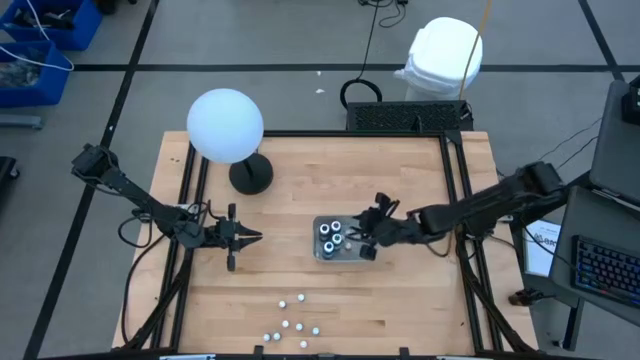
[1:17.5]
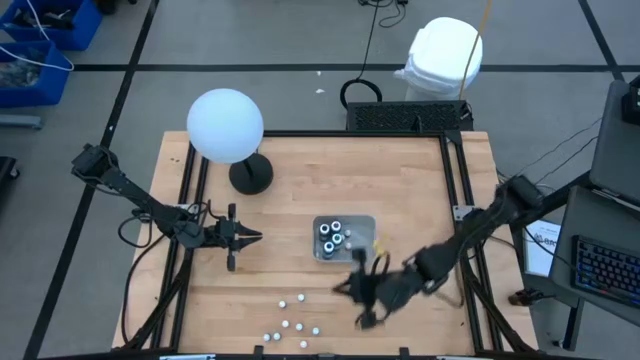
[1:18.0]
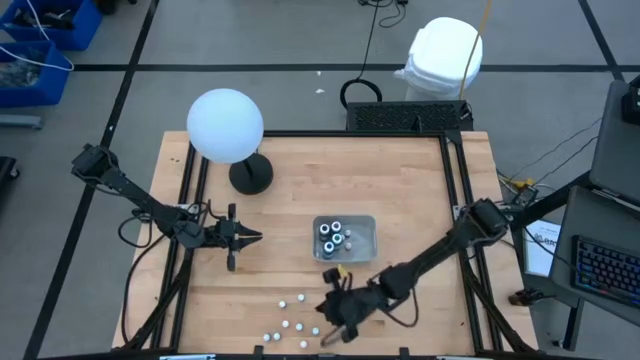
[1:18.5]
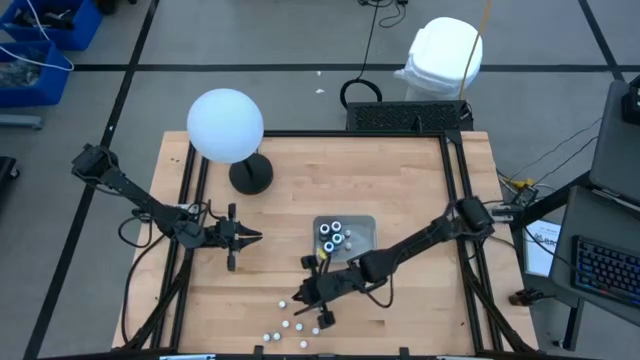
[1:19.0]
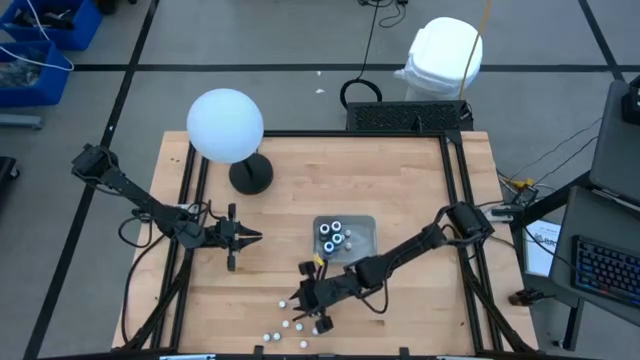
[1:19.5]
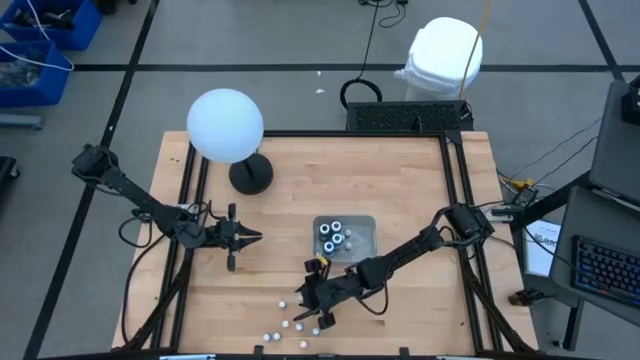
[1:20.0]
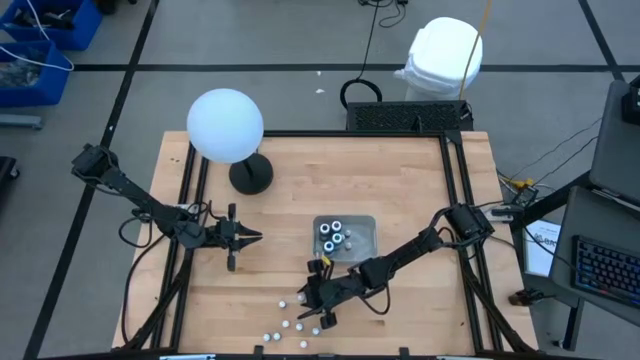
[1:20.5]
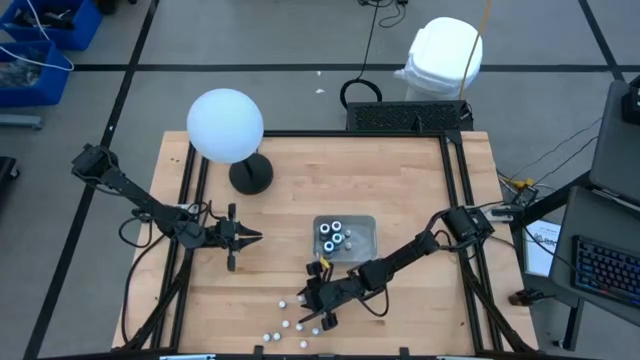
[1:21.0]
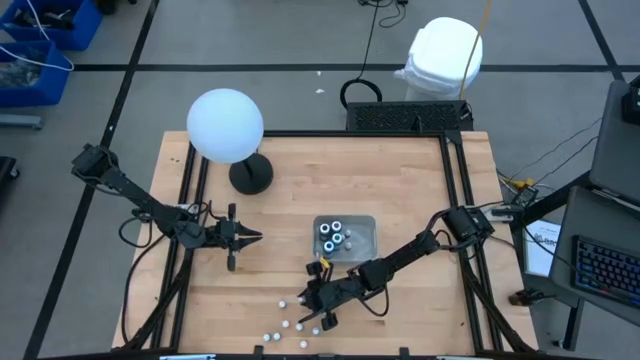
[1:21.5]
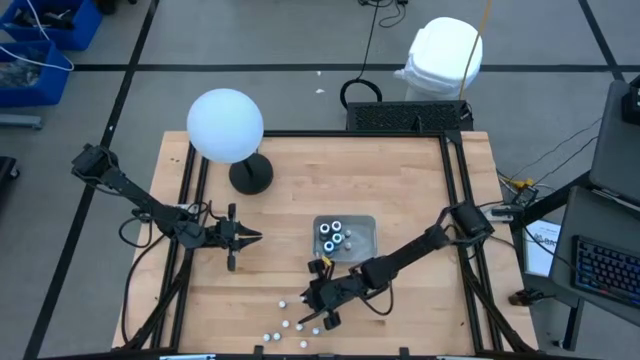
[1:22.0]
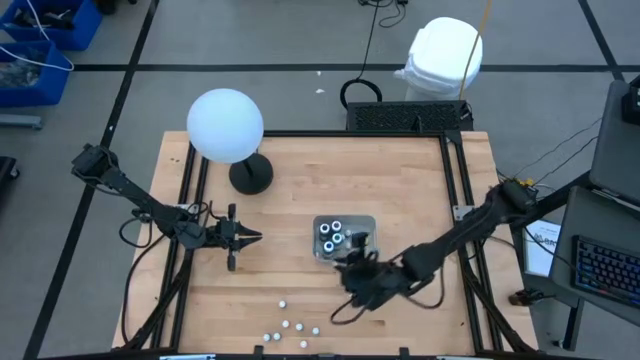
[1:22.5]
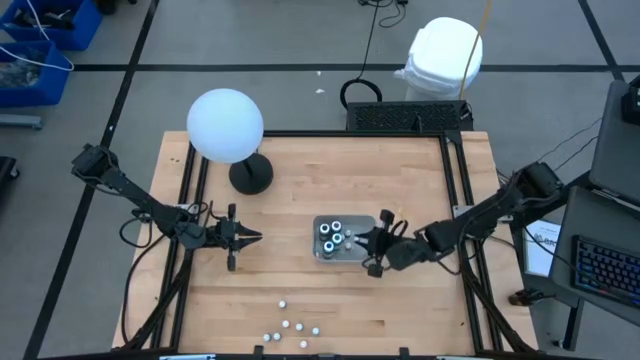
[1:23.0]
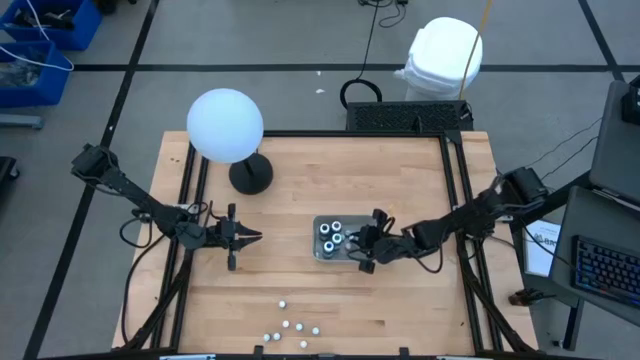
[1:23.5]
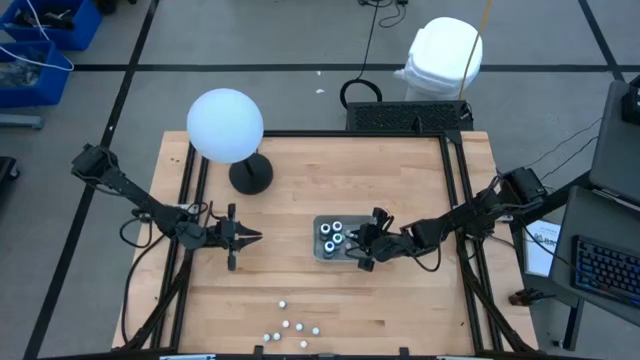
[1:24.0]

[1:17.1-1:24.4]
Task: Pick & Place food coloring
Put the small dark purple food coloring bottle into the gray bin

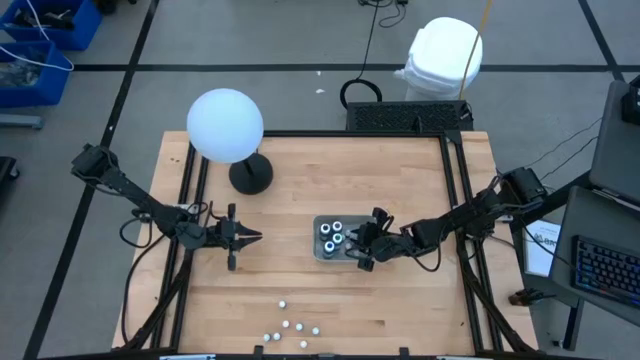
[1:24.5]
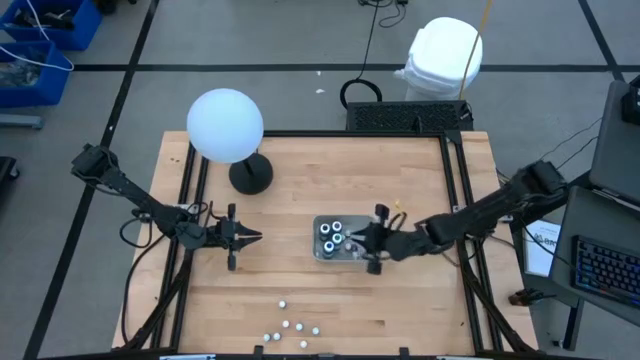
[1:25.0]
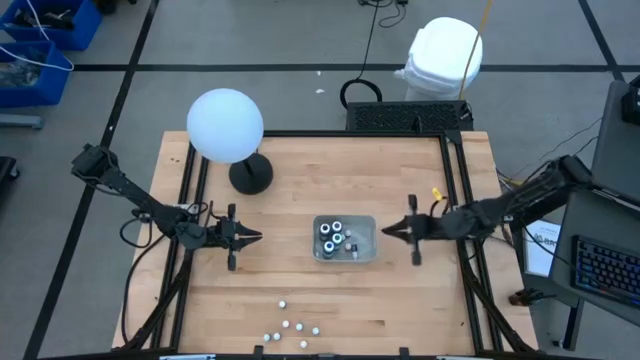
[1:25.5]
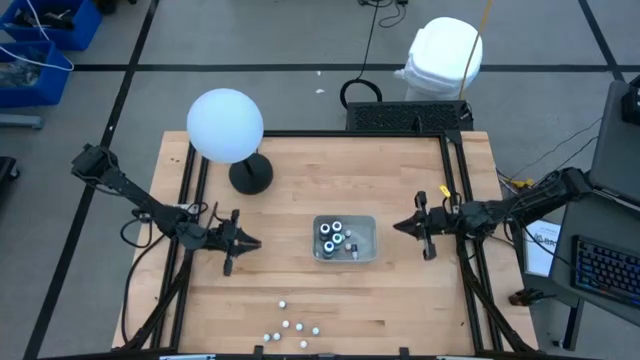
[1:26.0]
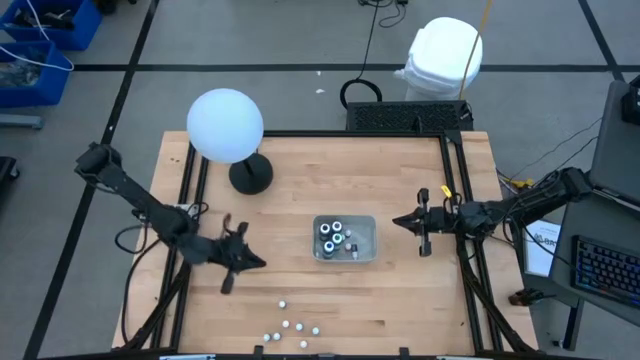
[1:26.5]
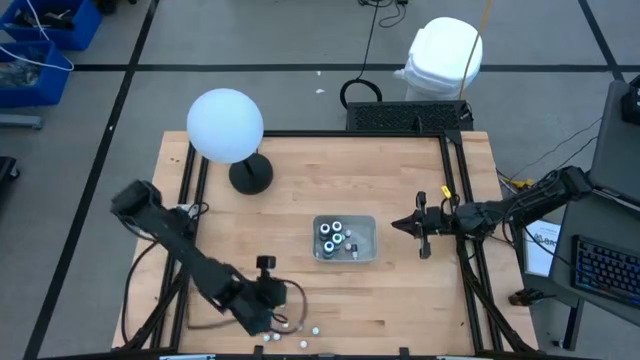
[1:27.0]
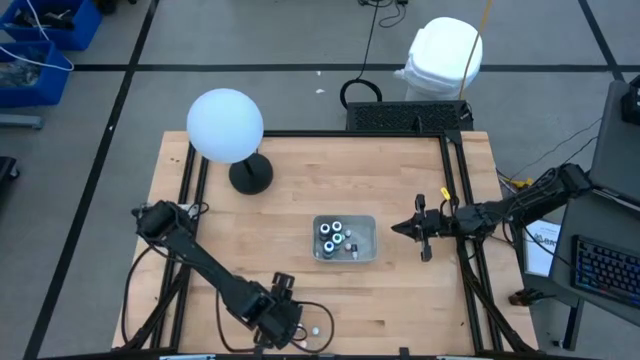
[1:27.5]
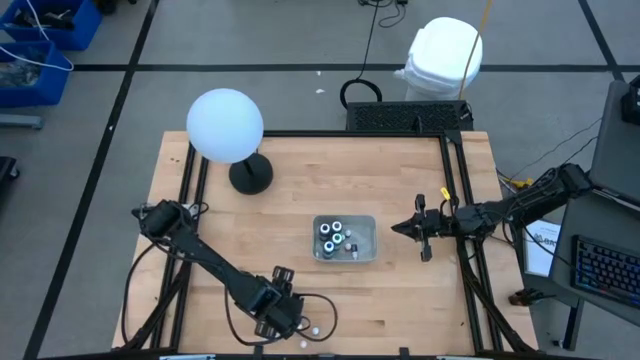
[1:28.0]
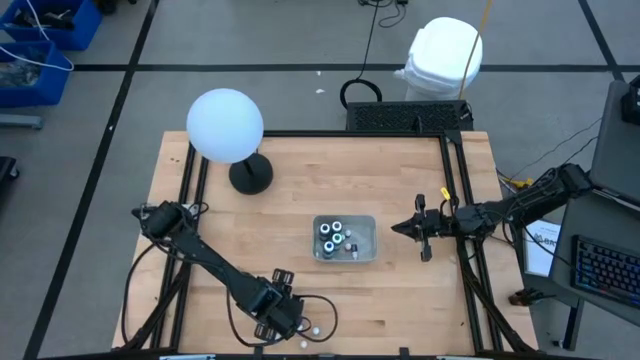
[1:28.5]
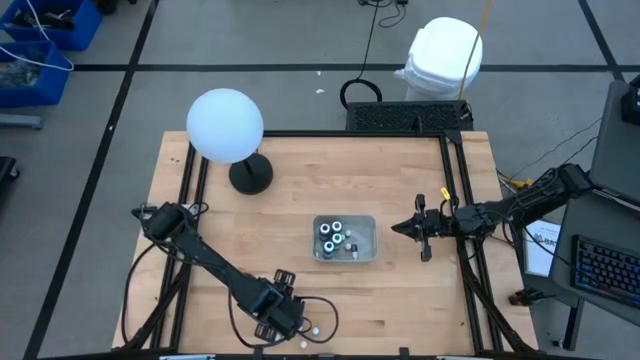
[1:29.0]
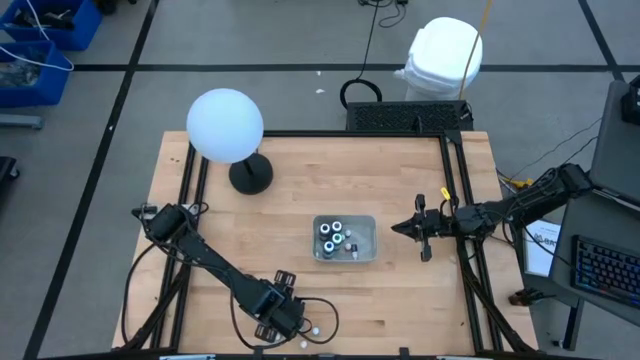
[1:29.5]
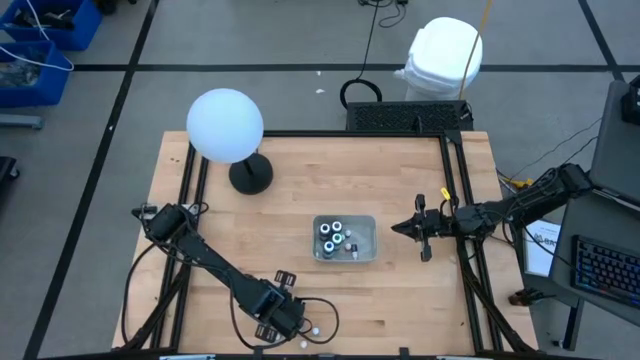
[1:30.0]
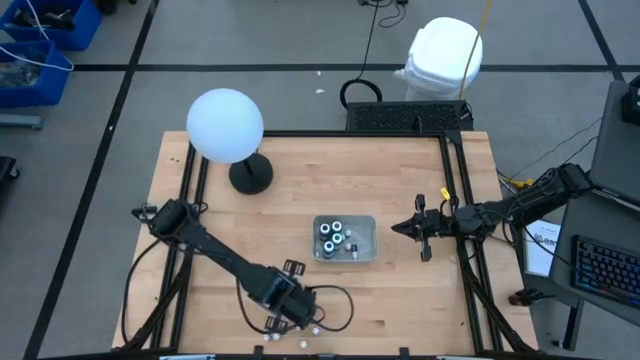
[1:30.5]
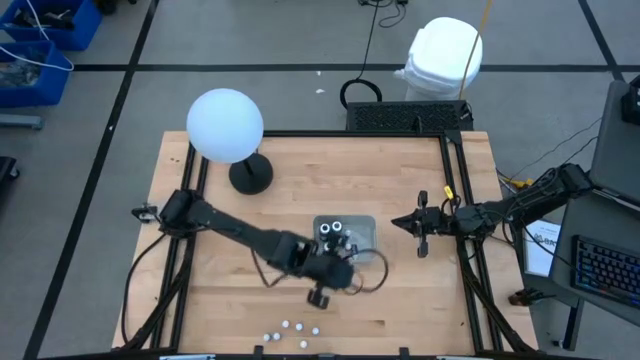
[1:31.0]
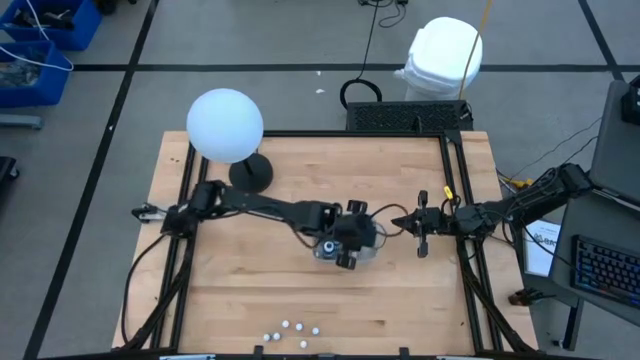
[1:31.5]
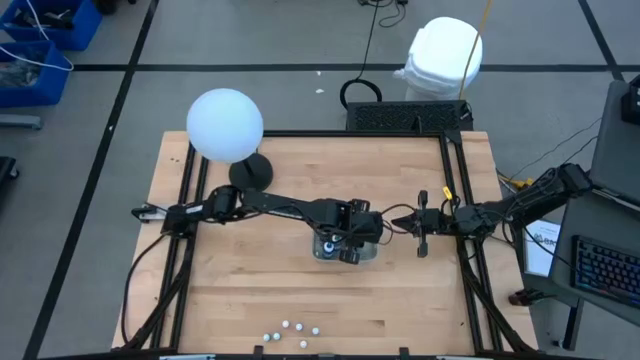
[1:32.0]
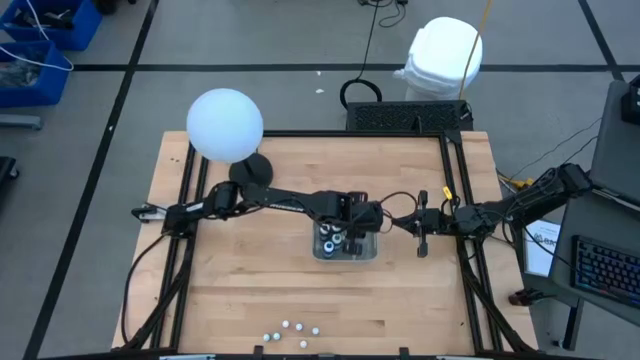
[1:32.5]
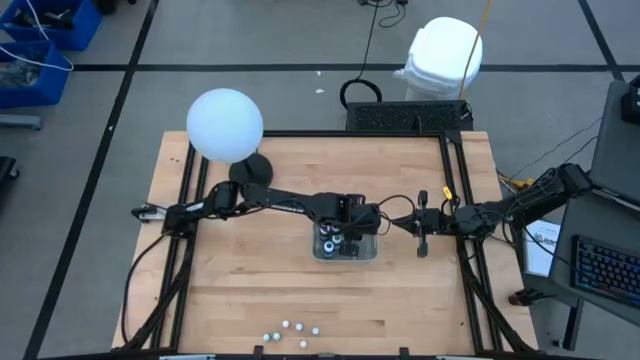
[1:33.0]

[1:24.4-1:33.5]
Put the small dark red food coloring bottle into the gray bin

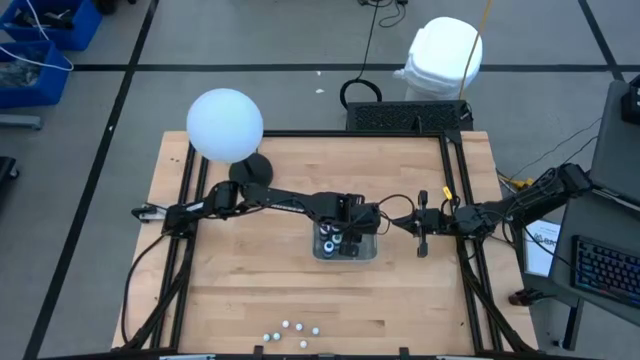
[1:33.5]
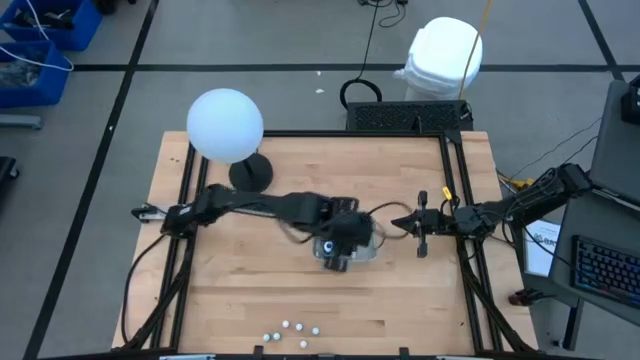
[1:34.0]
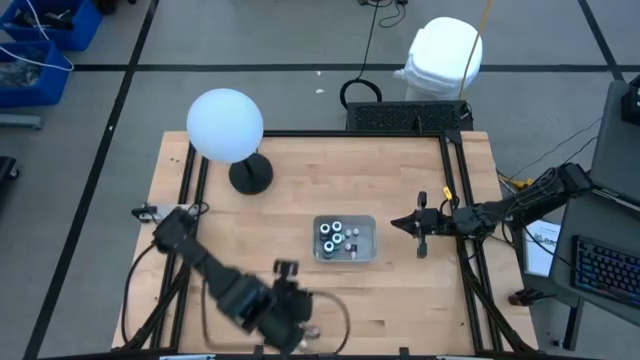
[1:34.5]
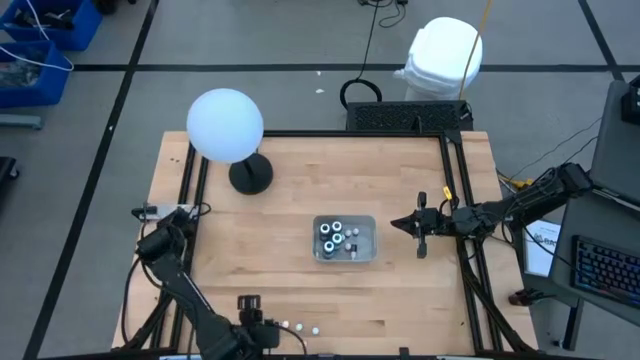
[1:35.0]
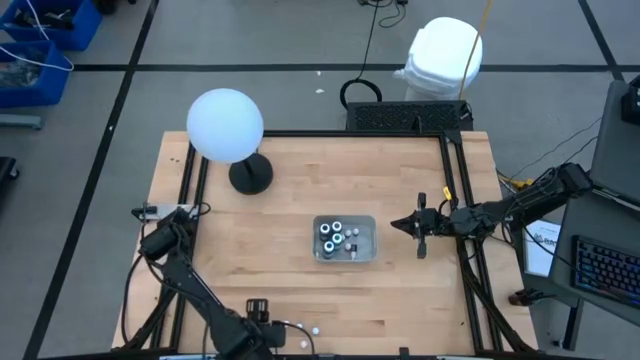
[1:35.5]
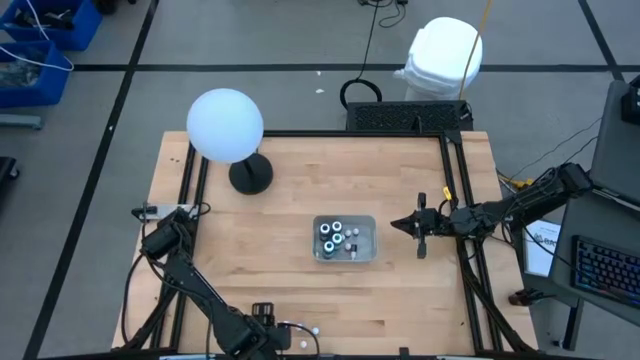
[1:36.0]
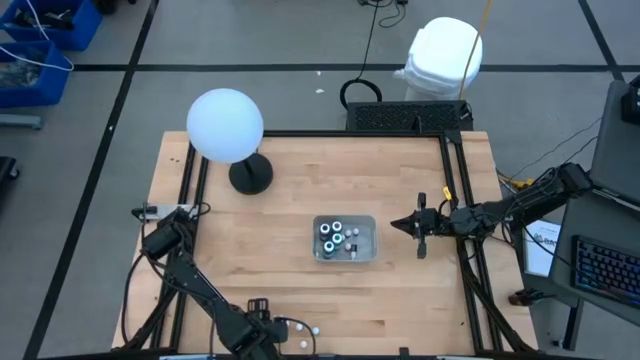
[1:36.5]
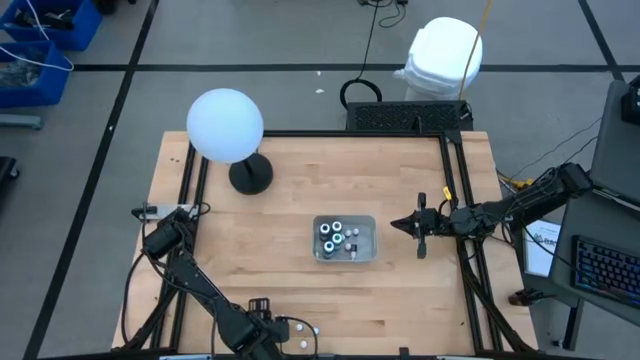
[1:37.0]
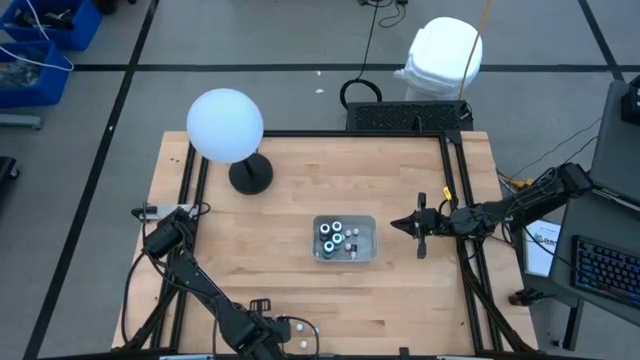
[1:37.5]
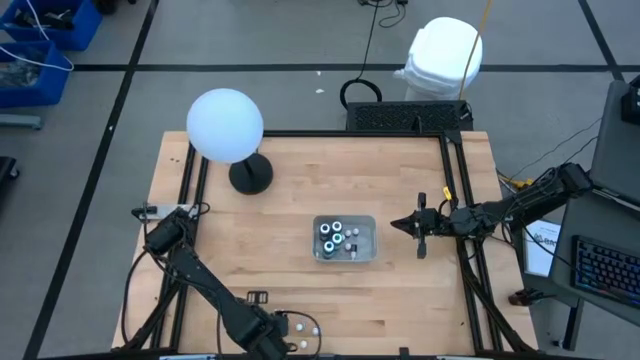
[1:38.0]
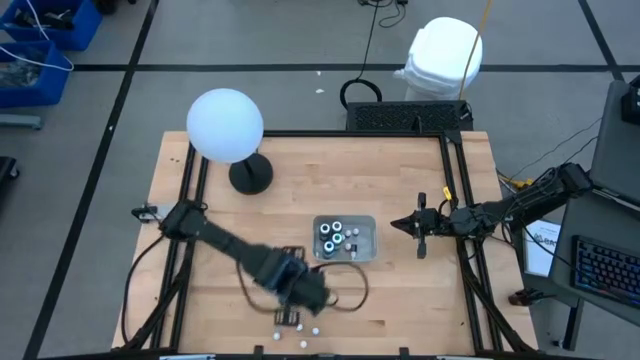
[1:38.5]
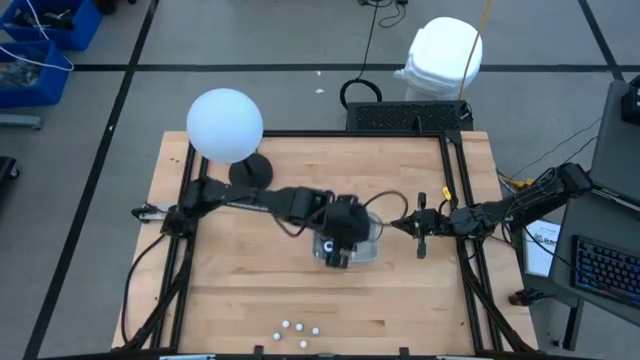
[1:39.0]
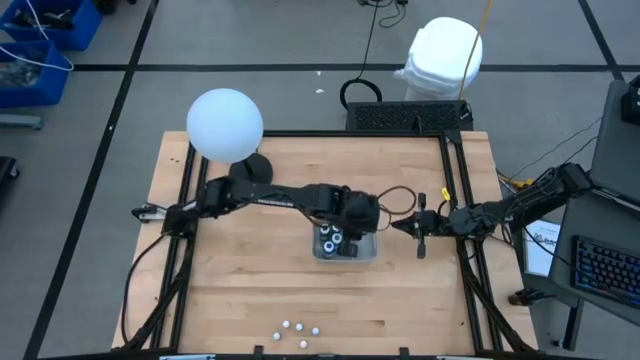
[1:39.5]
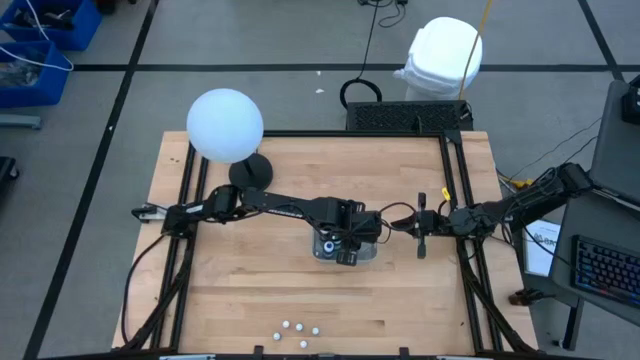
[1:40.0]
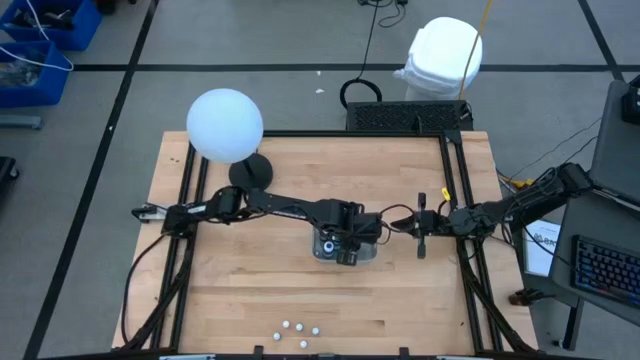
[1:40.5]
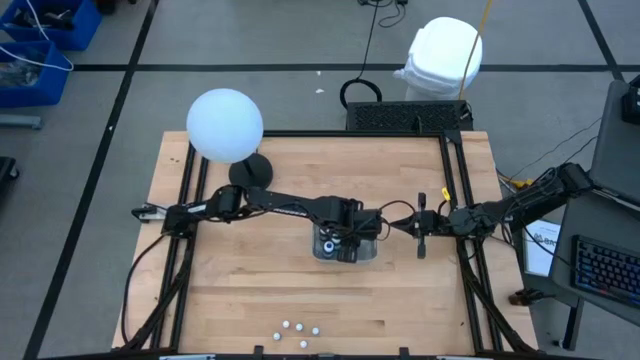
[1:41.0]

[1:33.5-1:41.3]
Put the small green food coloring bottle into the gray bin
